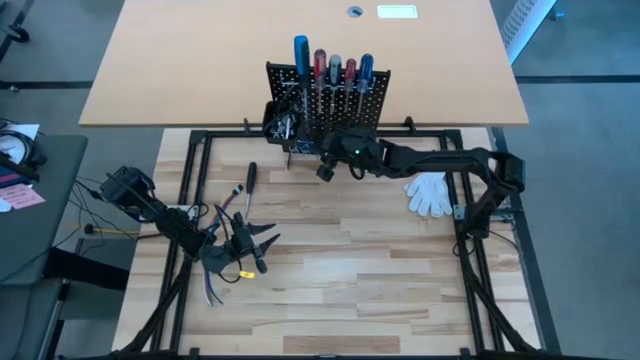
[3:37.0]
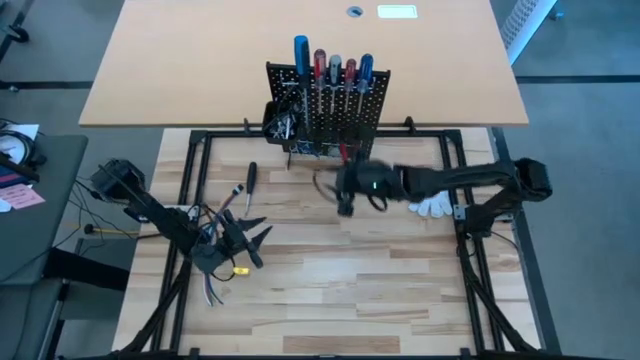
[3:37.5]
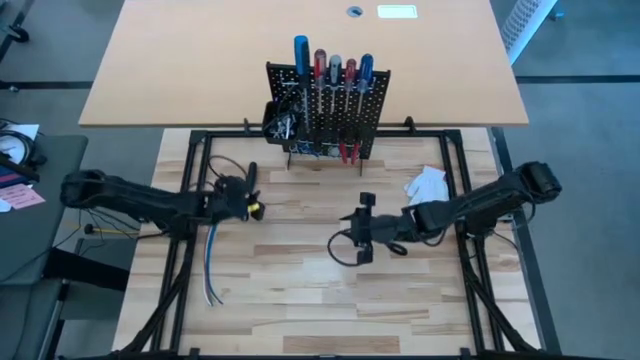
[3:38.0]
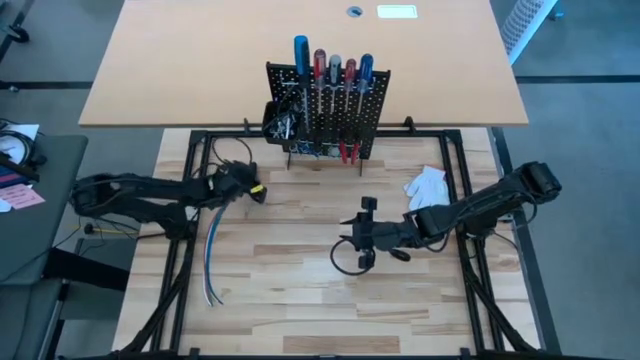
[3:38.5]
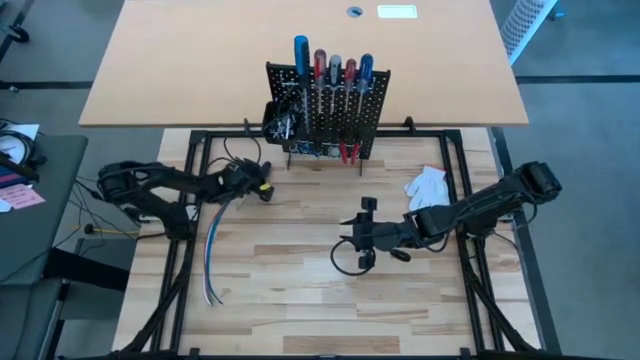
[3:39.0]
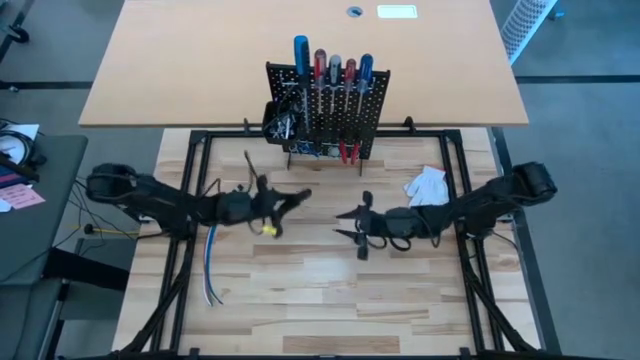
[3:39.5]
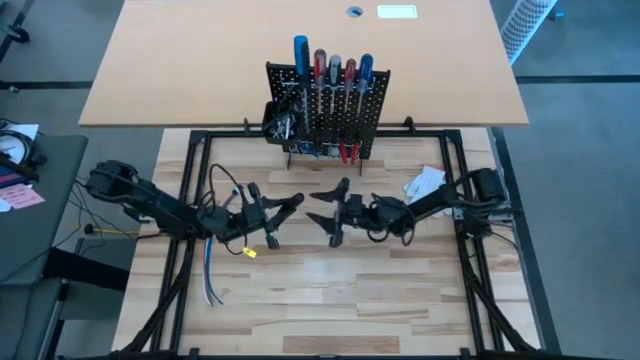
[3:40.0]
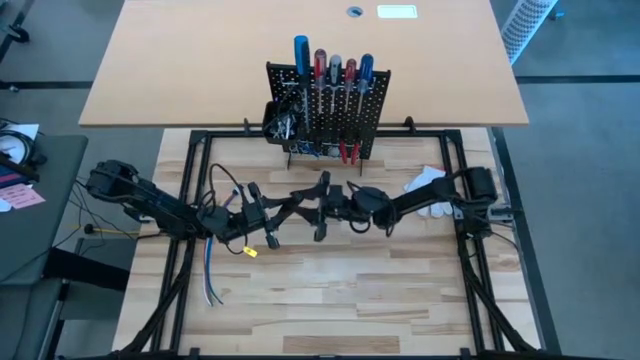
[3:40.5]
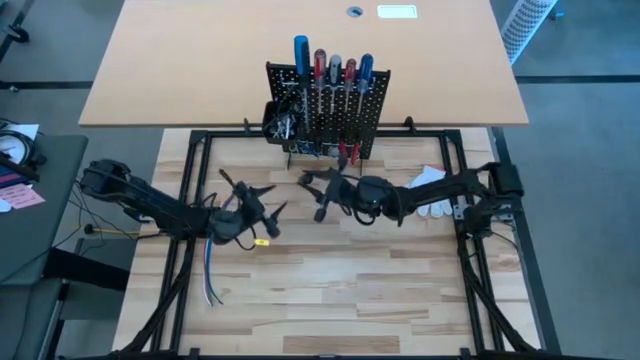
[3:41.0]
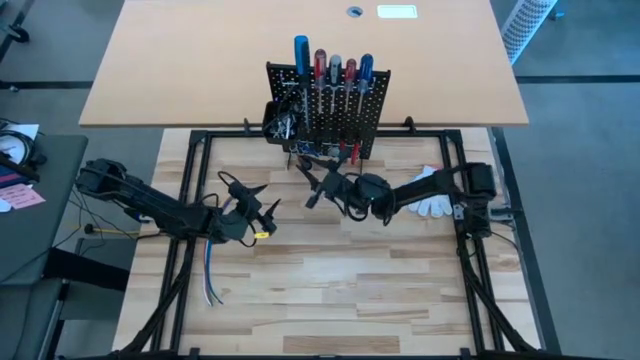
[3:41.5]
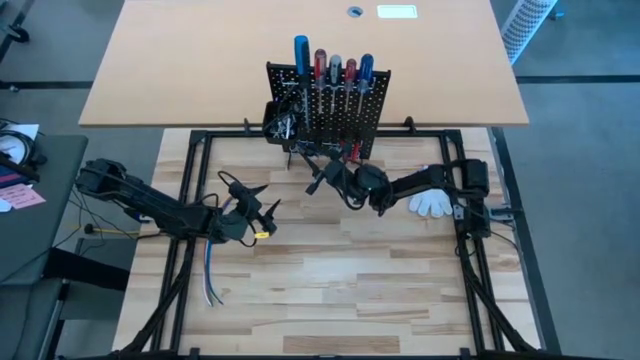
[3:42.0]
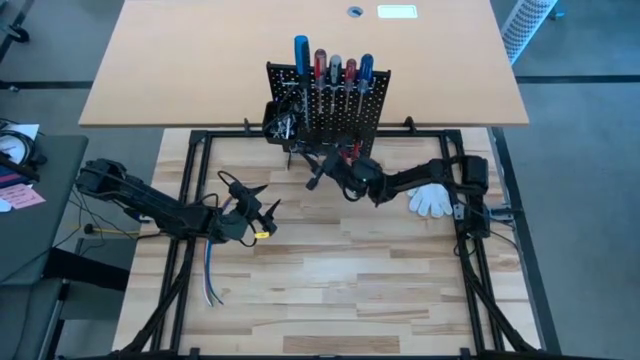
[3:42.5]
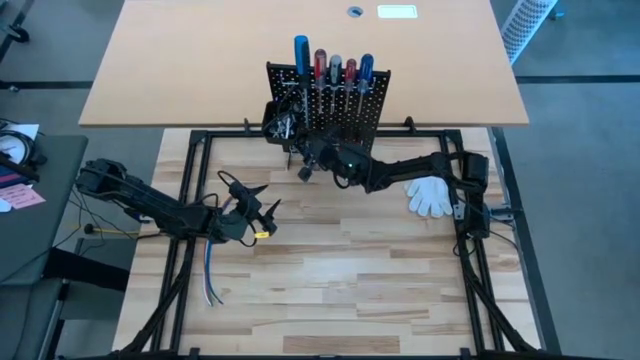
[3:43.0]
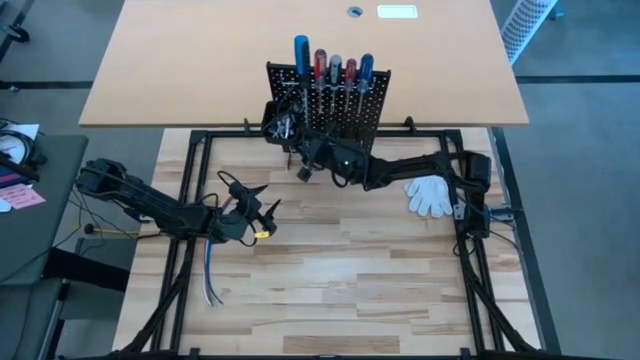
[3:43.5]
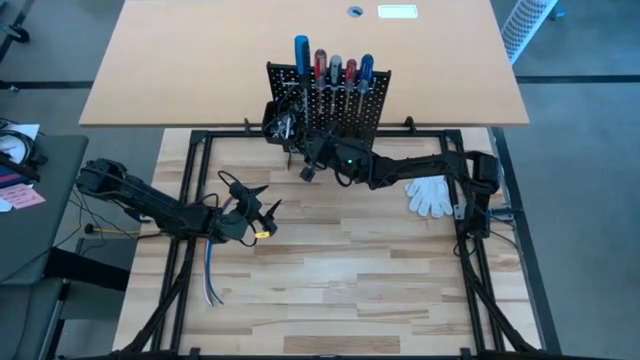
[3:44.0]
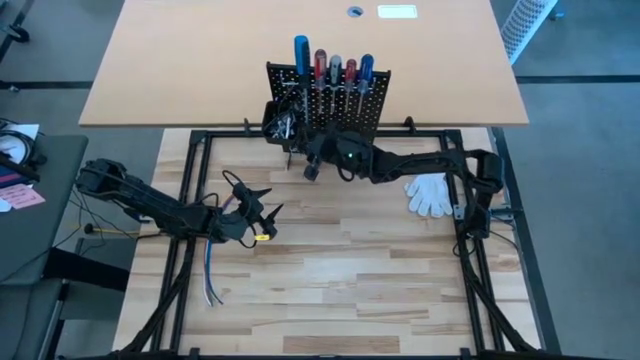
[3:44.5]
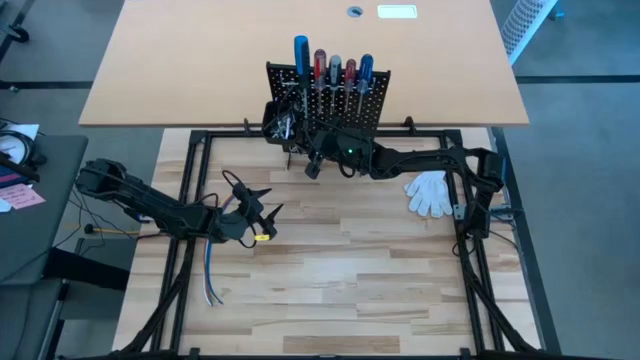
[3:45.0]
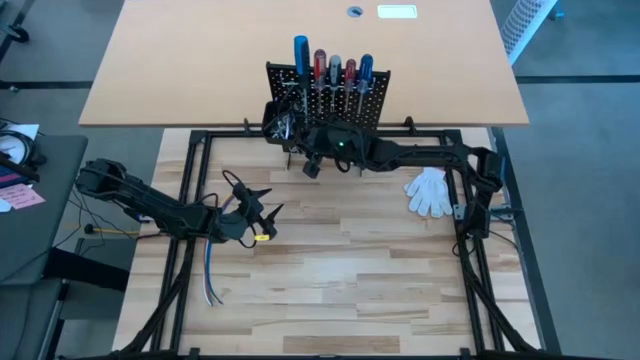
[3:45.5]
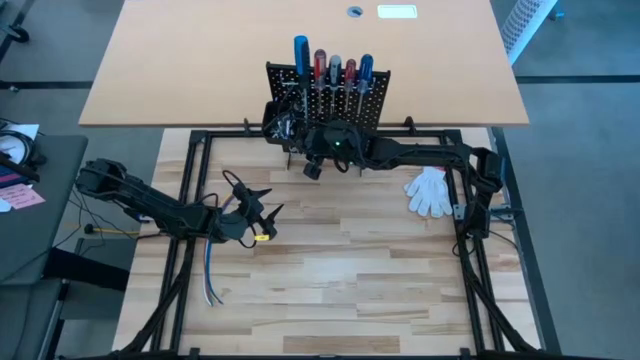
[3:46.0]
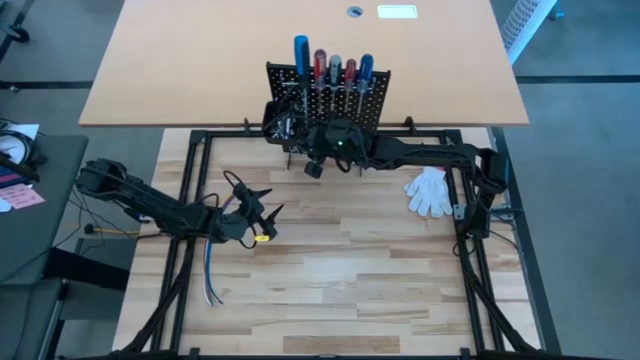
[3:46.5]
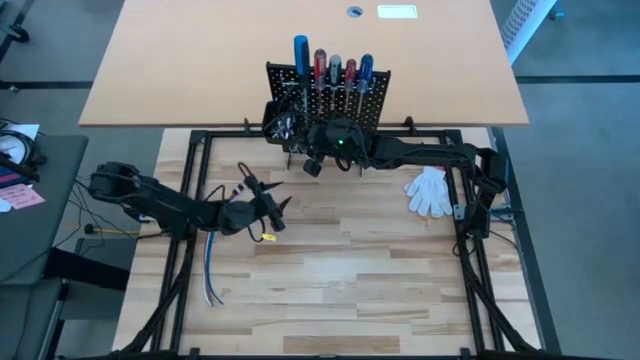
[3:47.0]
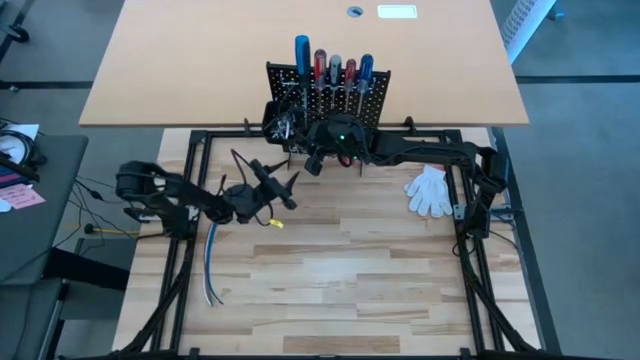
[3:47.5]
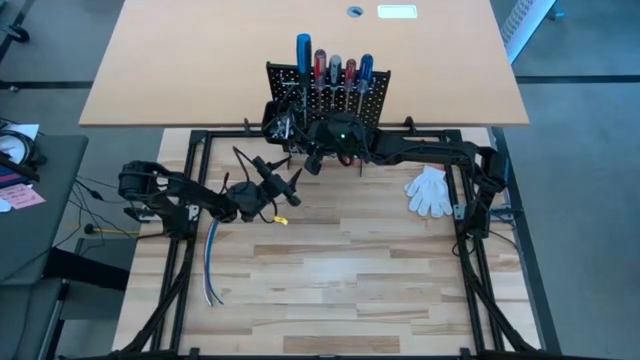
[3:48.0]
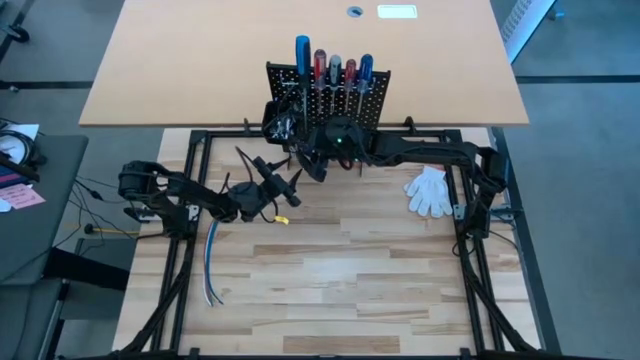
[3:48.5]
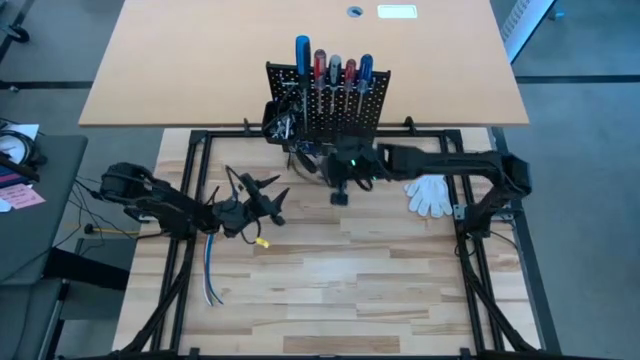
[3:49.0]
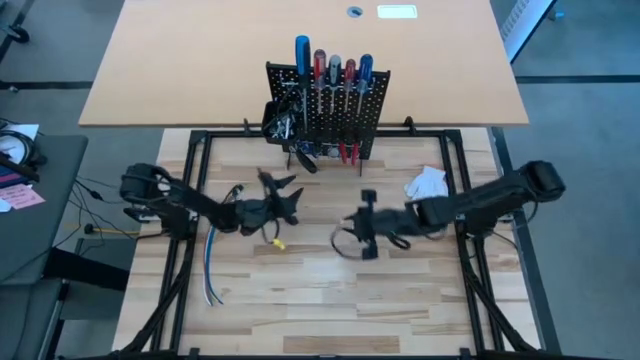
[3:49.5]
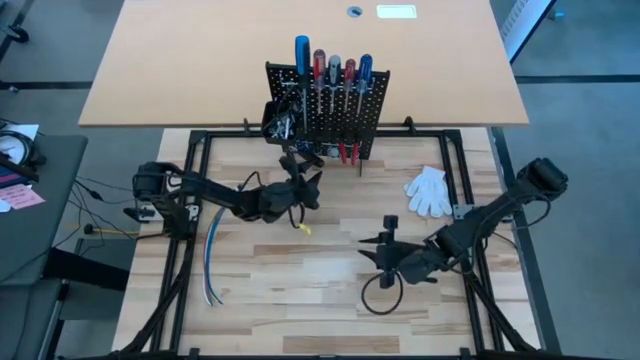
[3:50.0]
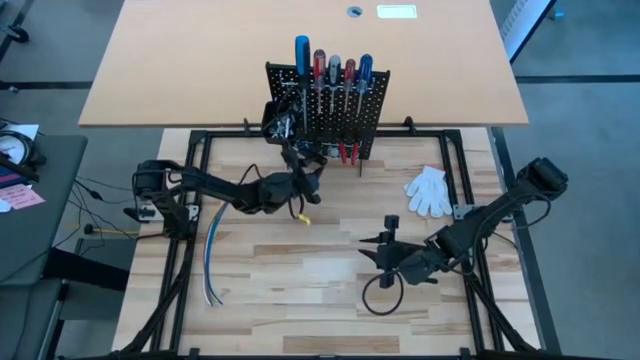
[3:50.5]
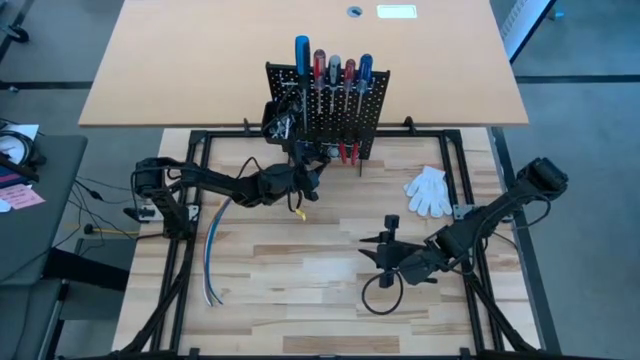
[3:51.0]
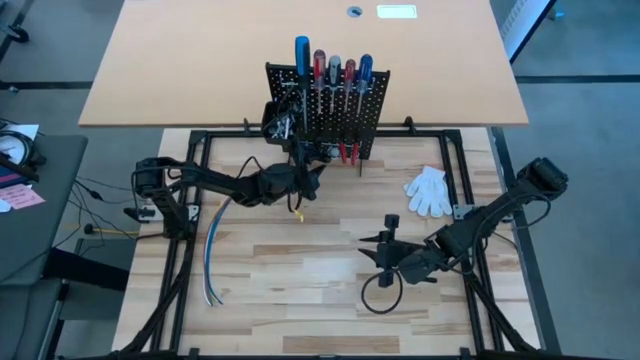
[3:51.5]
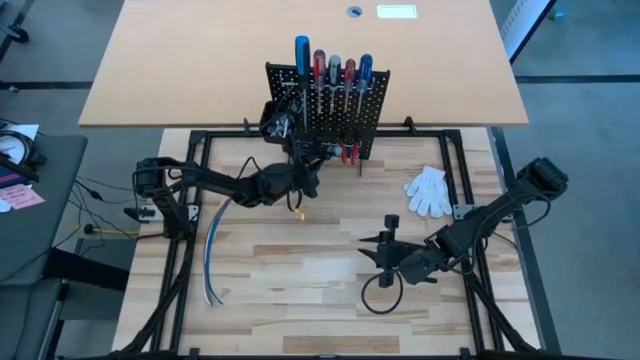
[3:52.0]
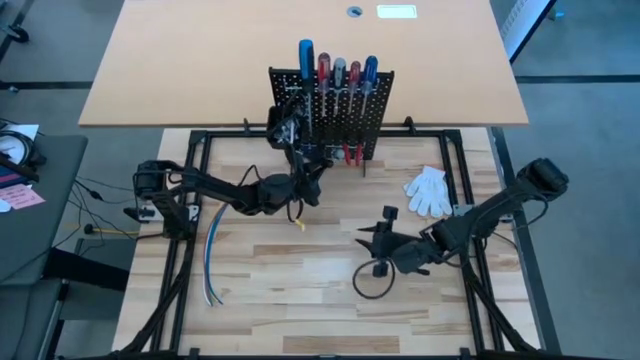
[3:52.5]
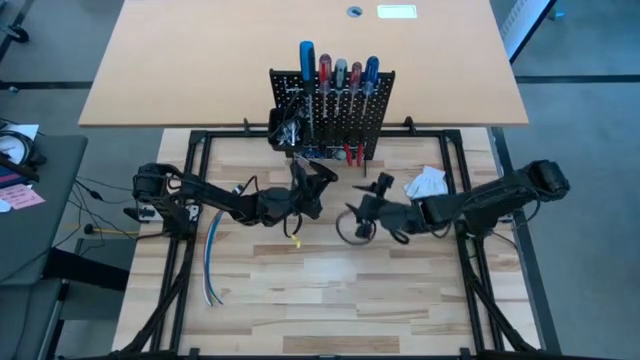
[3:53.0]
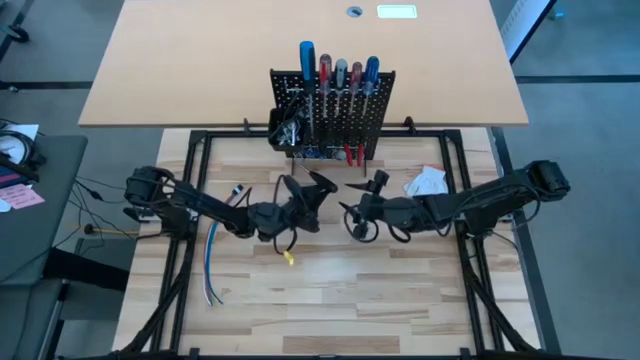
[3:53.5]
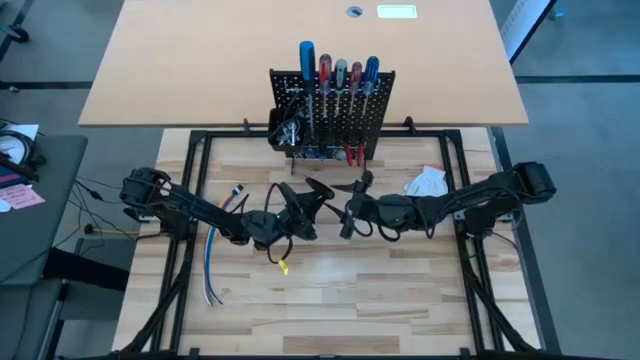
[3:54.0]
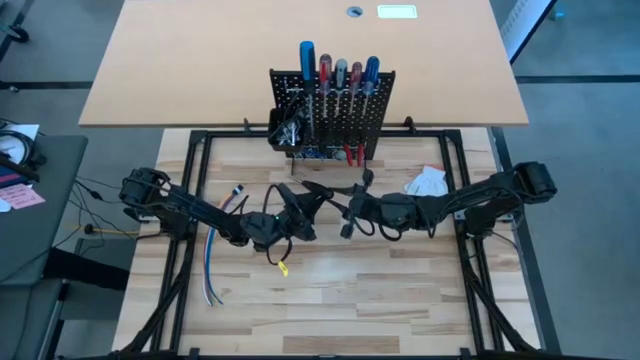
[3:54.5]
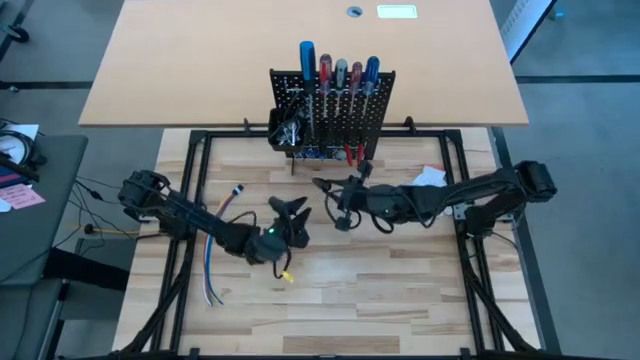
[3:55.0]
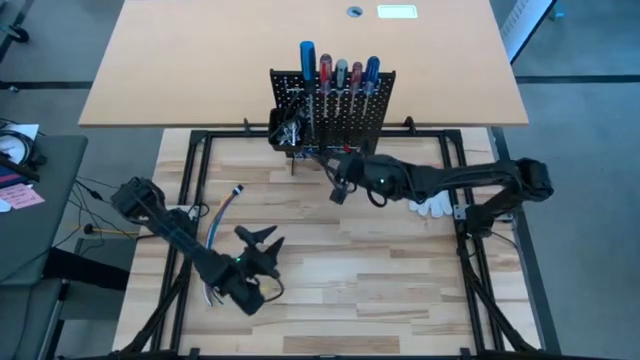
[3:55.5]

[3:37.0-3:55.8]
Task: Hang tools onto peg board
Hang the black screwdriver on the black pegboard

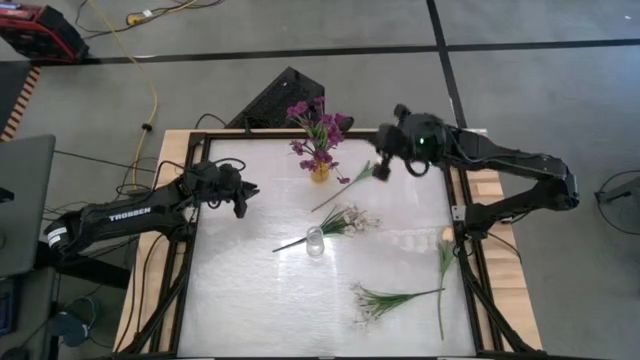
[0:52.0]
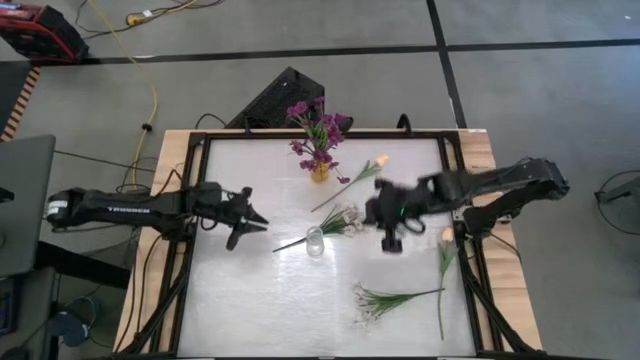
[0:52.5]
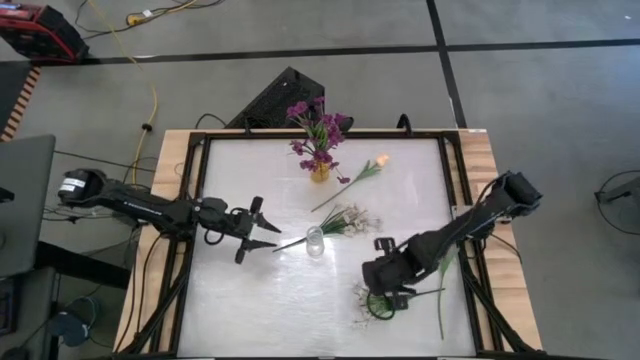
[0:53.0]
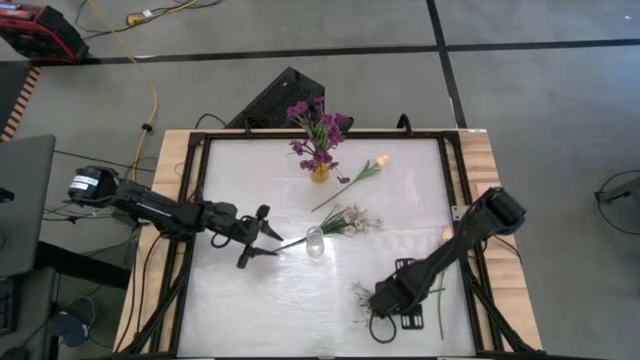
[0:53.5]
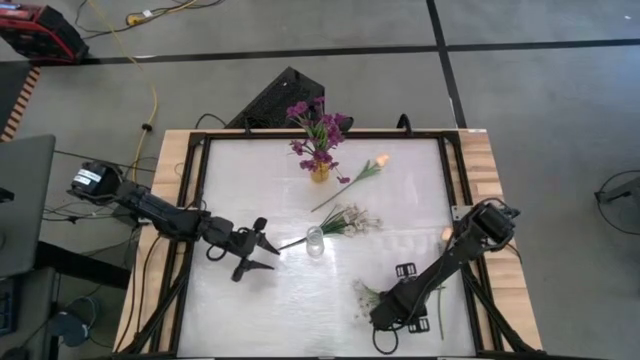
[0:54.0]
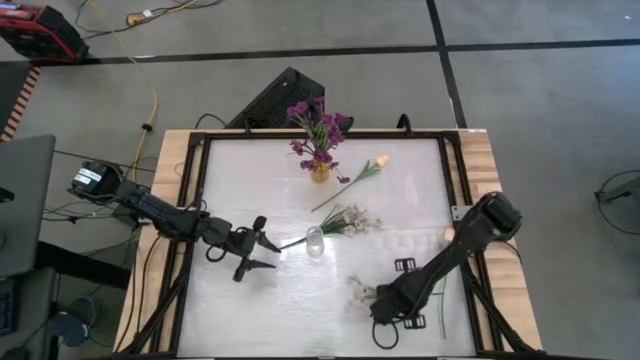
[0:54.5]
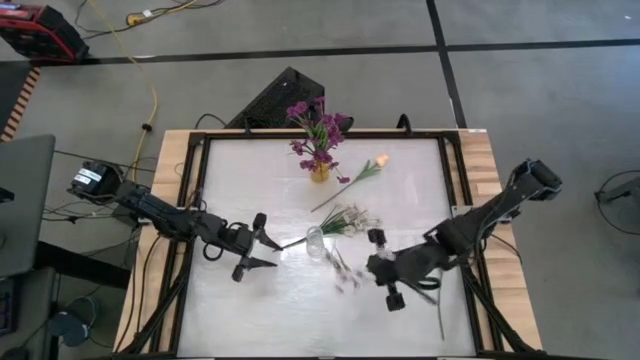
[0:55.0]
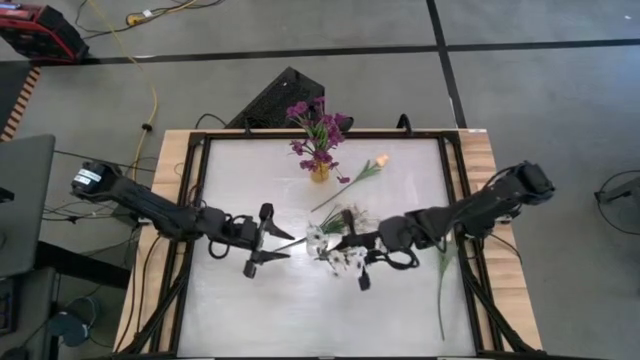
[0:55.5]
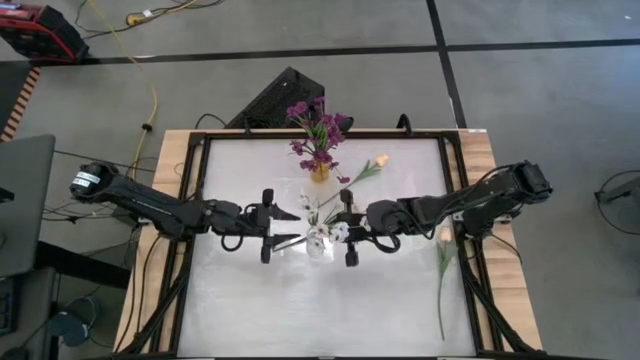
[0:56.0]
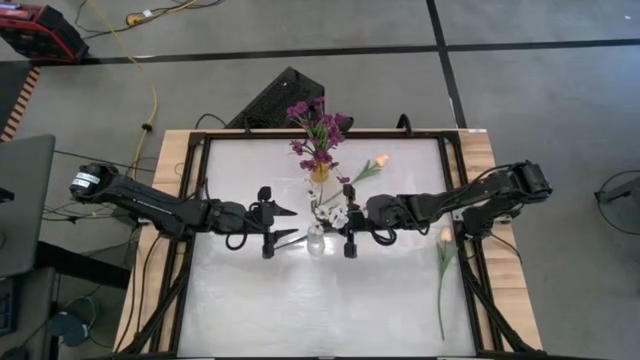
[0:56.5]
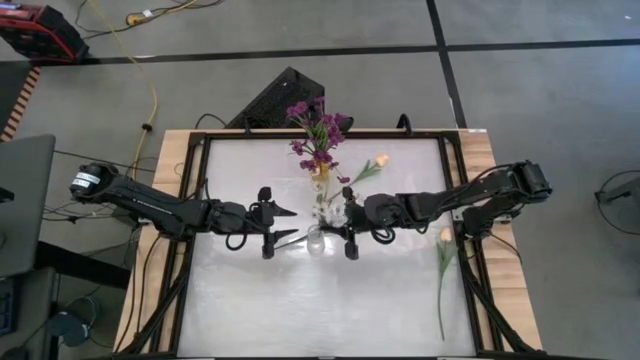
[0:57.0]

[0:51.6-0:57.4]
Task: Sort flowers into vase by color
Put the bottom white flowers into the transparent vase
